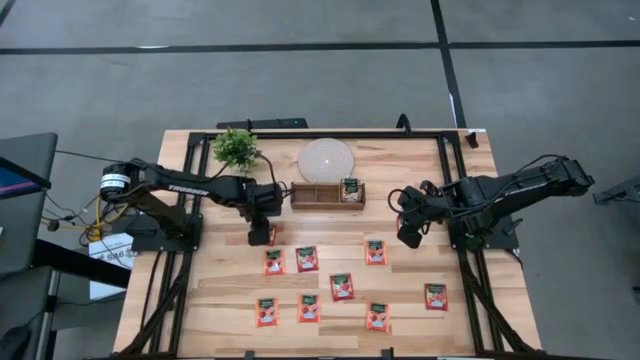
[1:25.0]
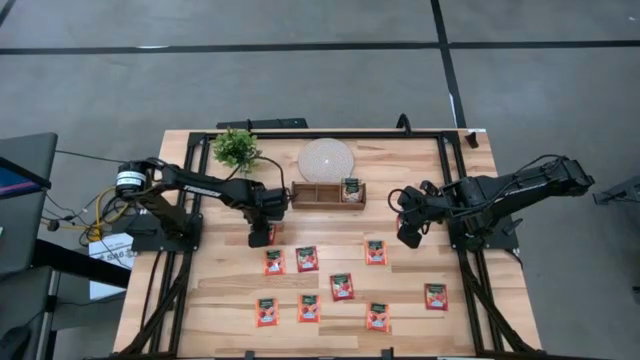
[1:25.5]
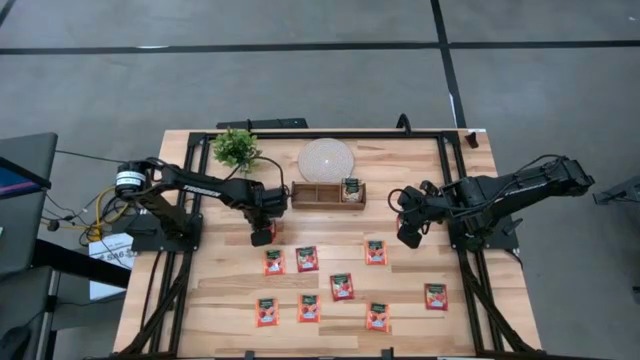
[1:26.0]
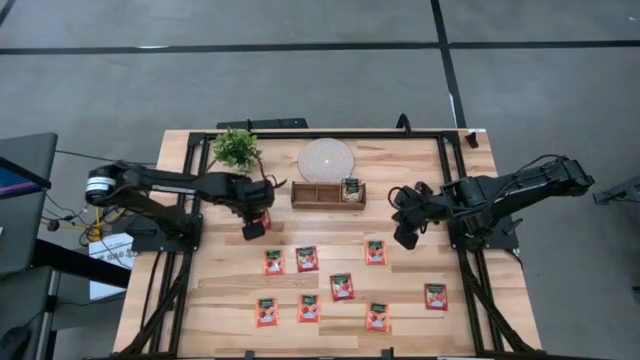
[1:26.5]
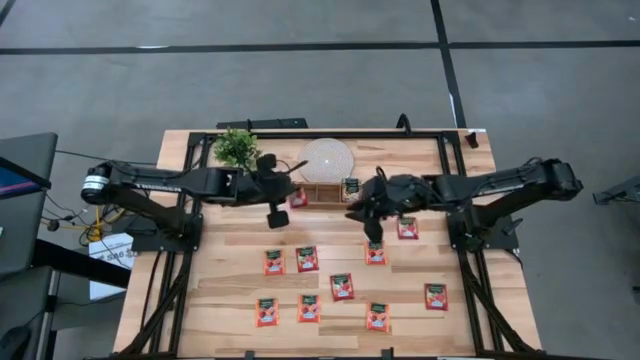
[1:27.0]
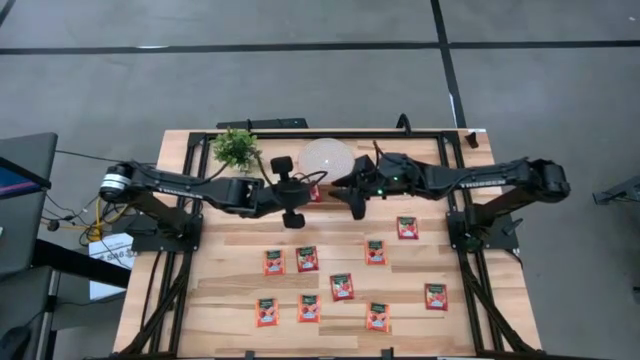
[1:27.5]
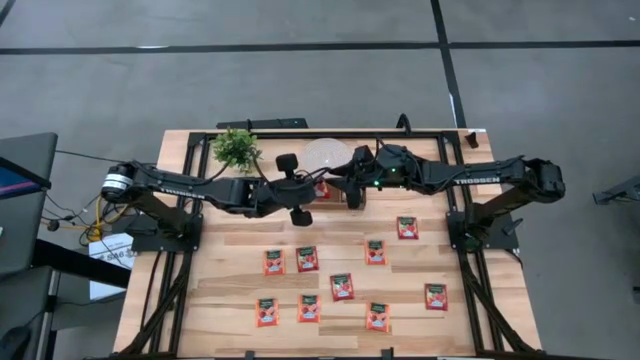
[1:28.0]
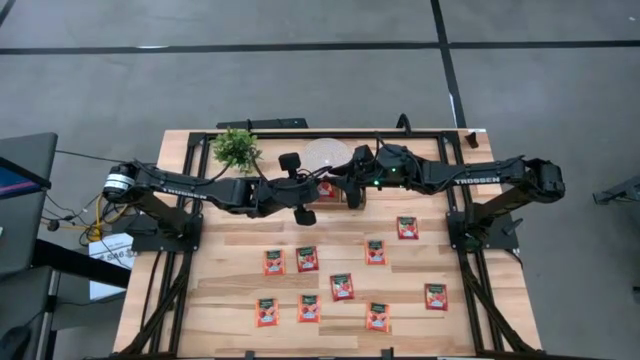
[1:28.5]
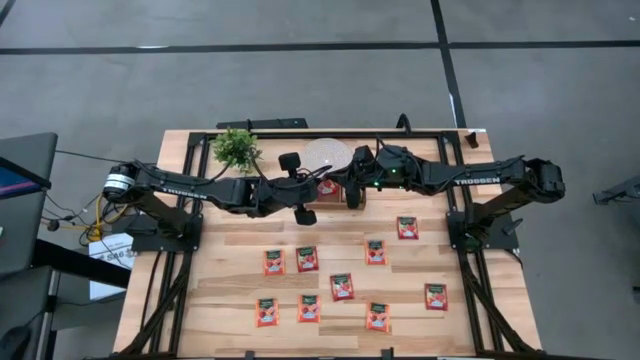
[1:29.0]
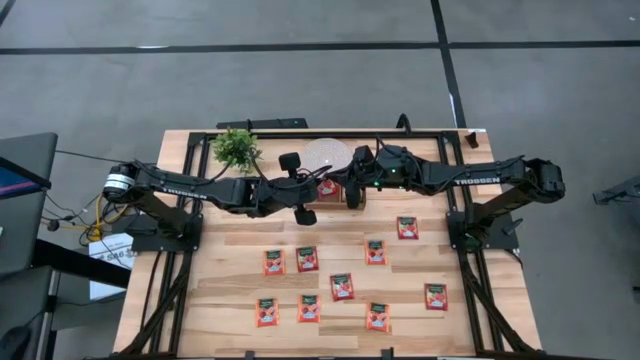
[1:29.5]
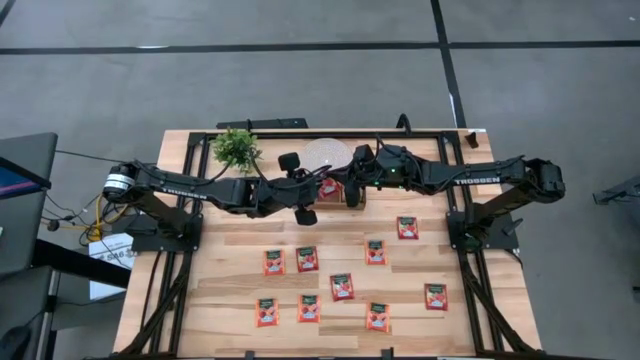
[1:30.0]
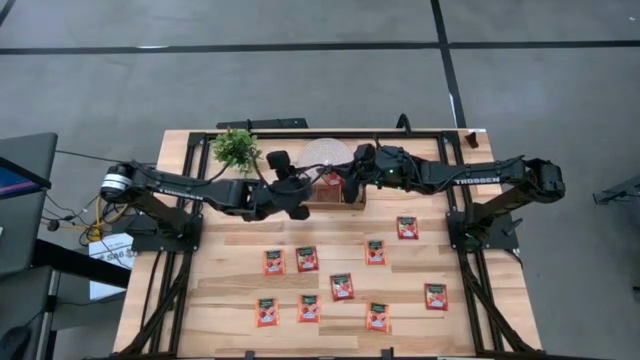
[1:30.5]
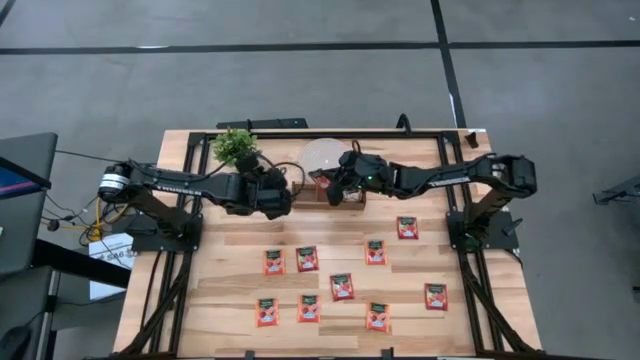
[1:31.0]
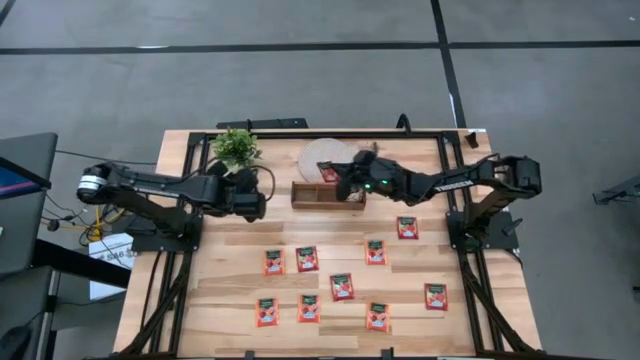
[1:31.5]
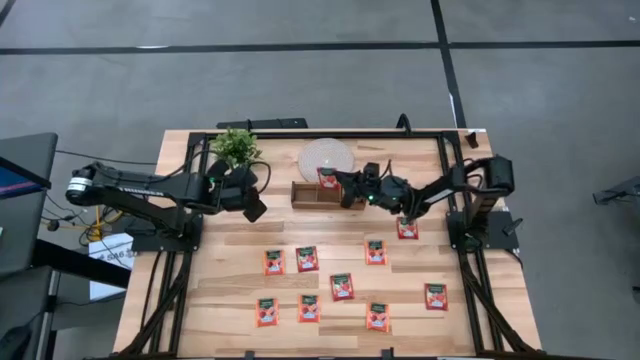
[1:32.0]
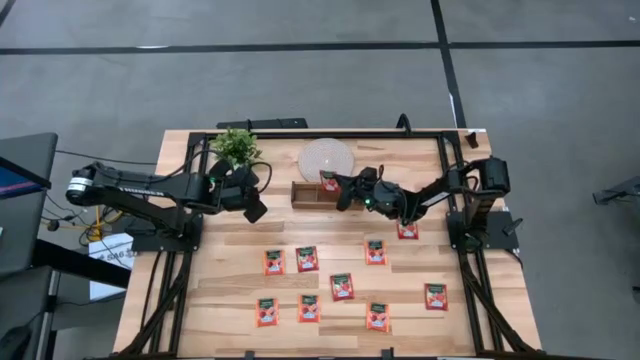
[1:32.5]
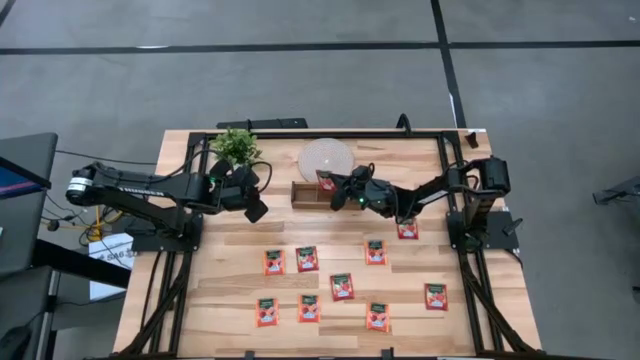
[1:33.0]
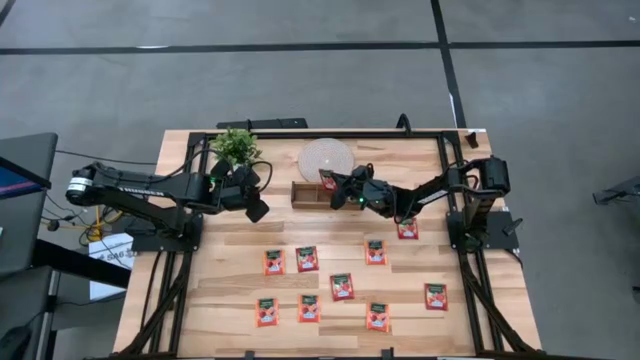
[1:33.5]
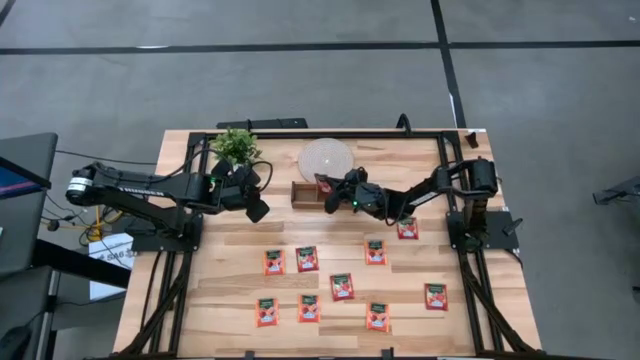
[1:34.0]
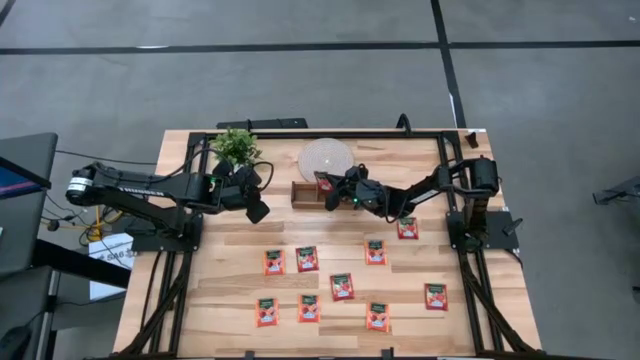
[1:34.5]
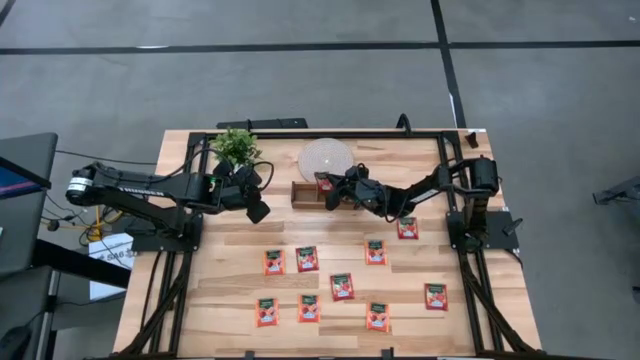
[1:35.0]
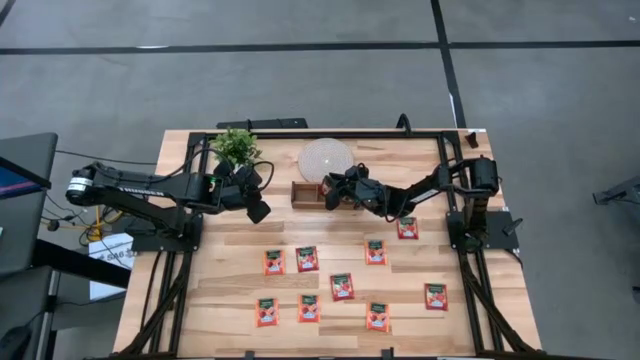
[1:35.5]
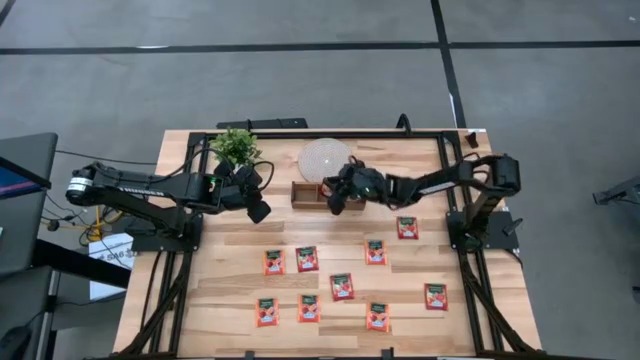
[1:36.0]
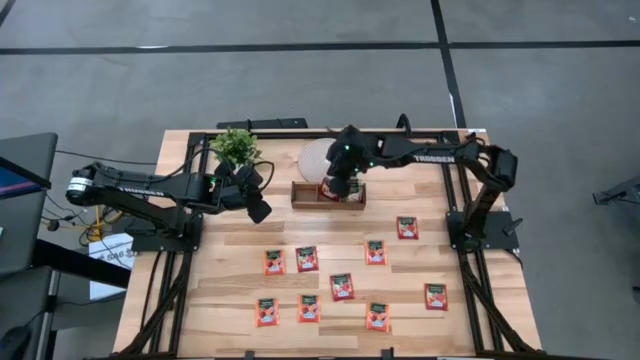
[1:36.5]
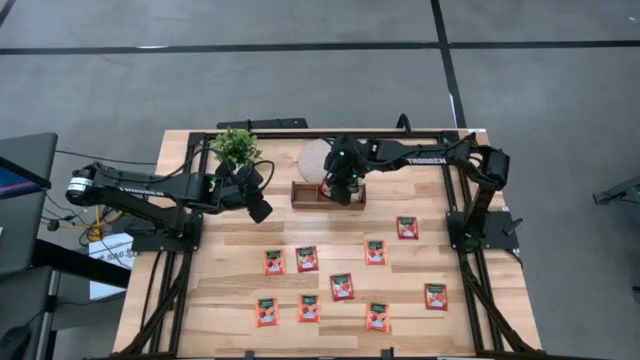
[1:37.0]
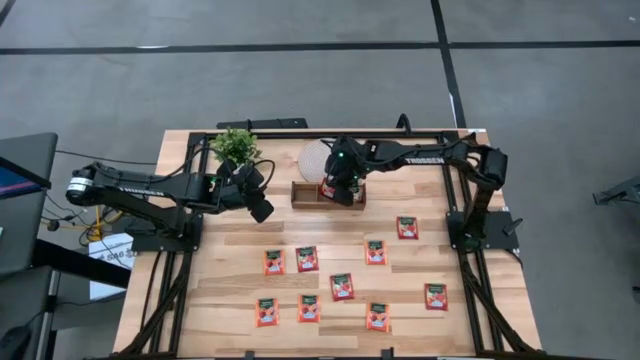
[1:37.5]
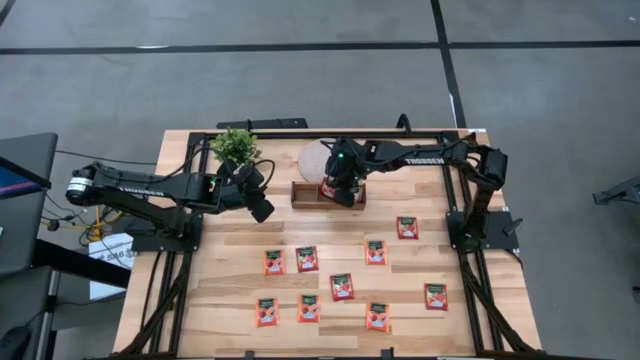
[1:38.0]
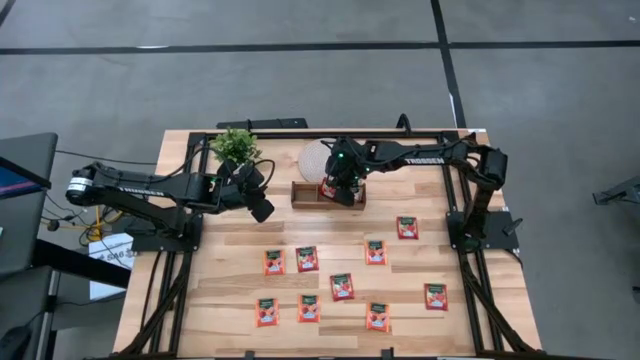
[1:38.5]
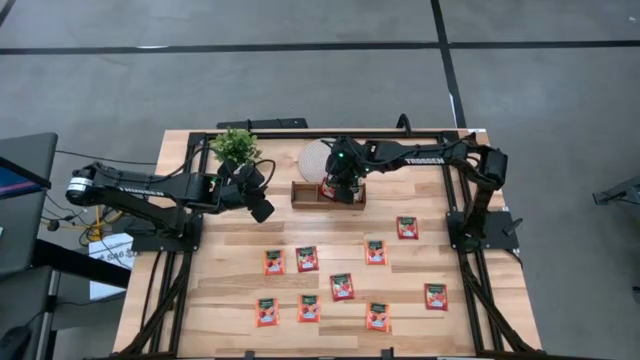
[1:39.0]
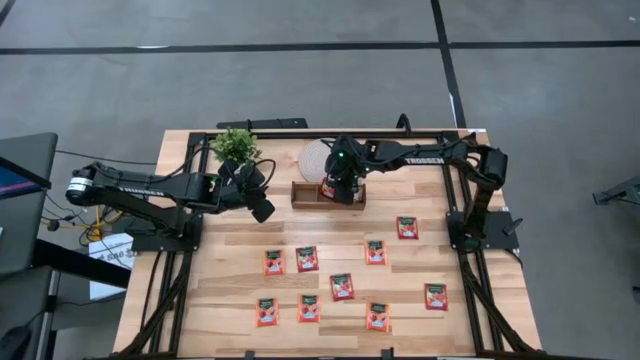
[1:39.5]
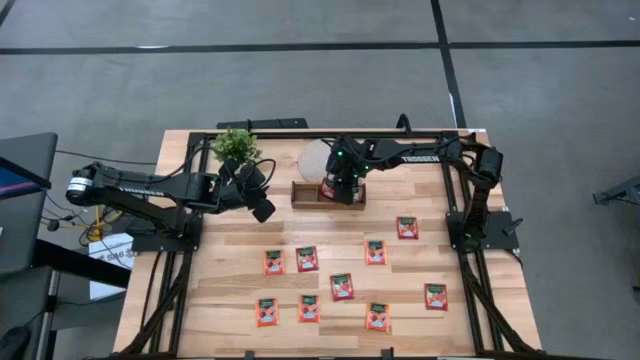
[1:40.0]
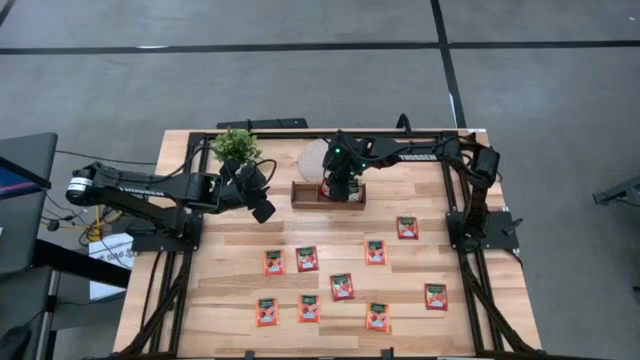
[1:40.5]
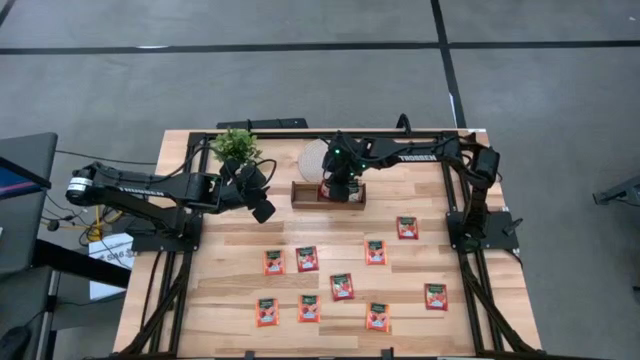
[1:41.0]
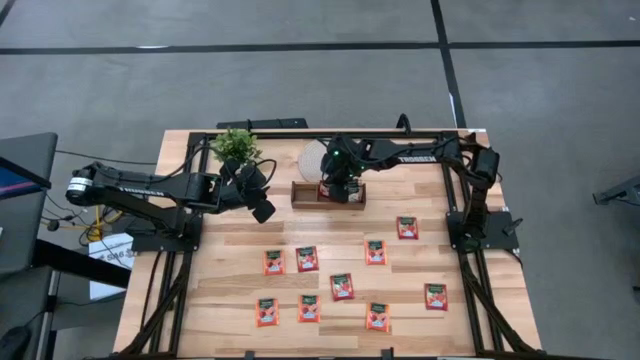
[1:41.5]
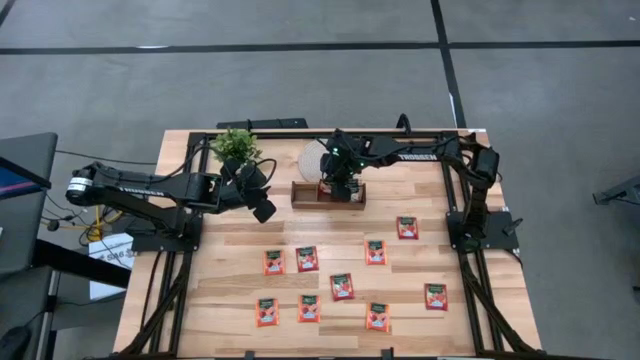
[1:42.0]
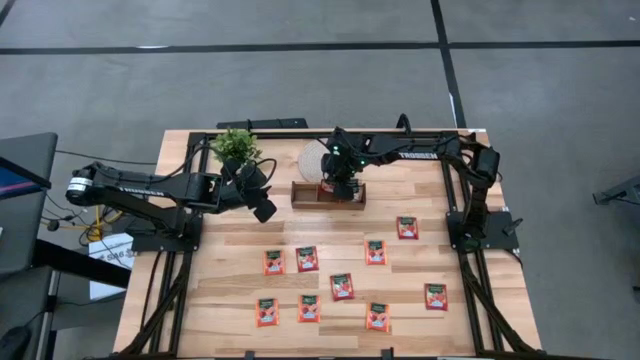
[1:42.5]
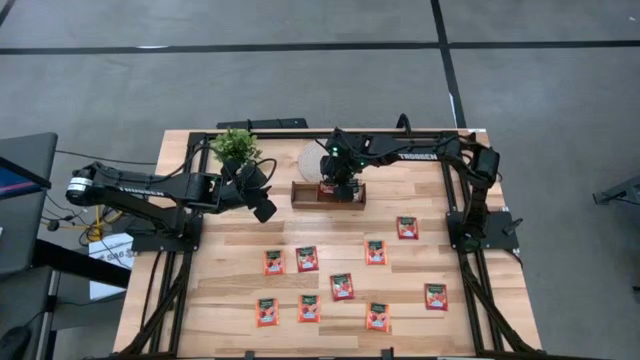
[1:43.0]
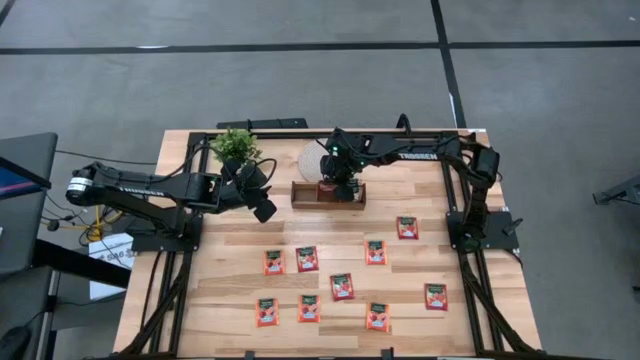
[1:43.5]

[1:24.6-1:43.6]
Task: Pick & Place Tea
Put the red tea bag into the middle section of the wooden organizer

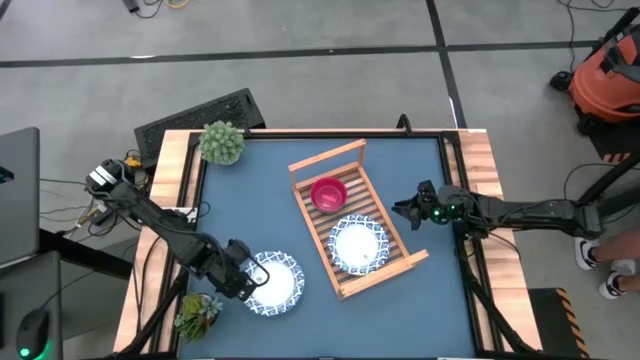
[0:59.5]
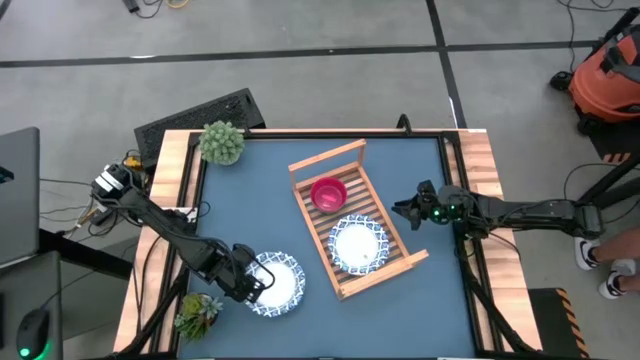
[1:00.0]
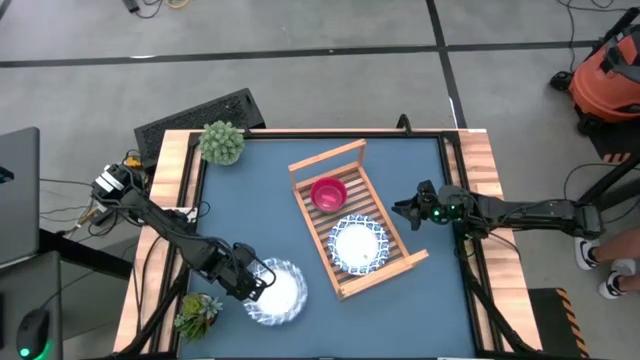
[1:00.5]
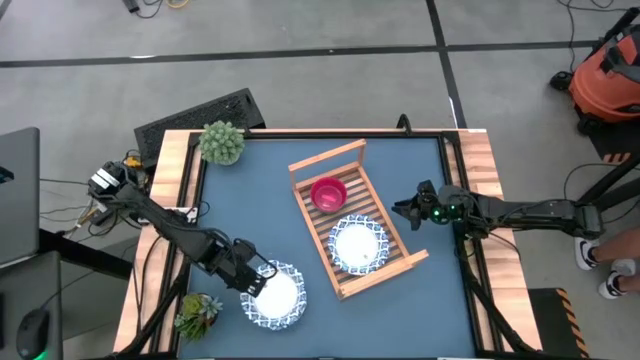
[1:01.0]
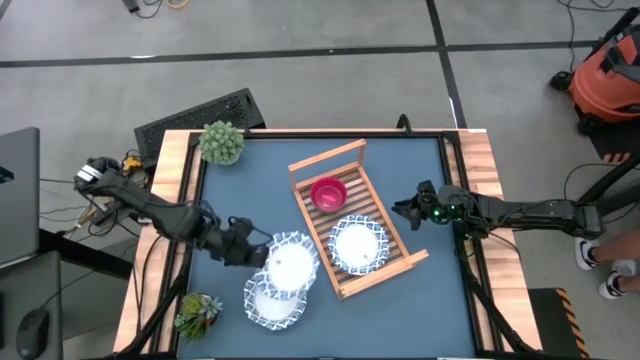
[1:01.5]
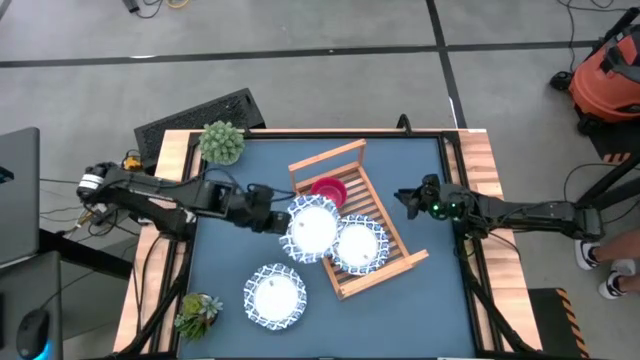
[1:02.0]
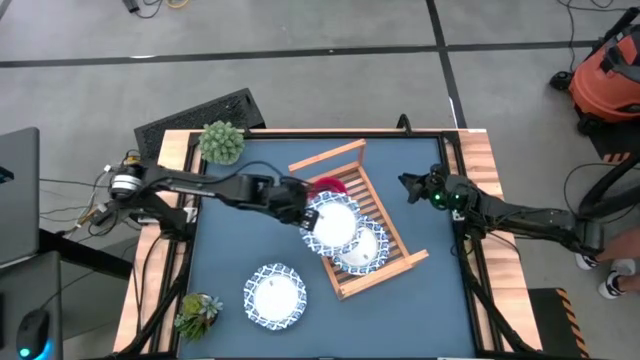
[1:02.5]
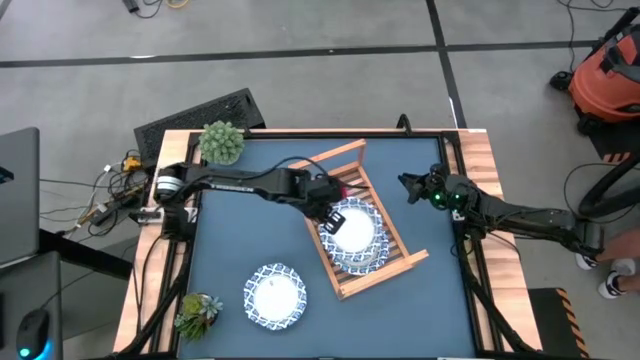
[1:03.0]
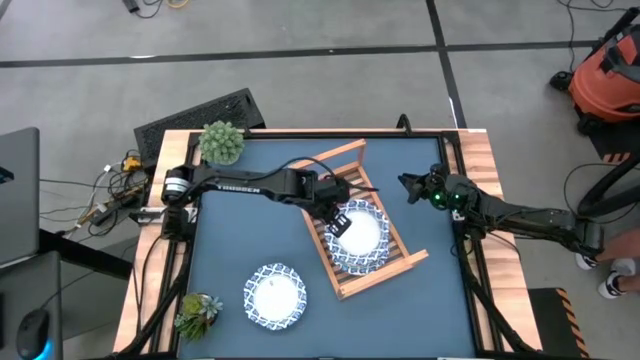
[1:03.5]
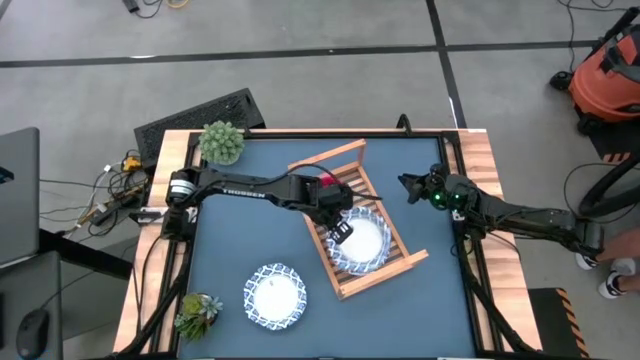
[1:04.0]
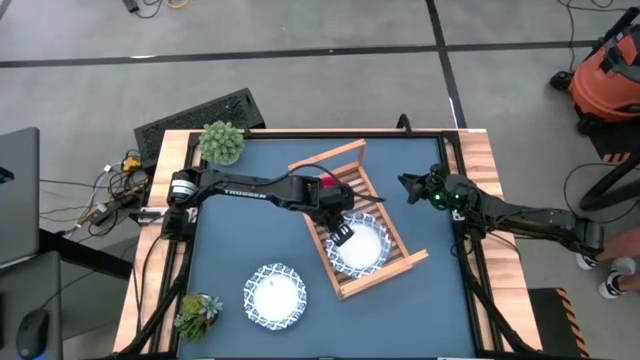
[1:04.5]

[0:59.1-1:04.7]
Task: Place and stack bowls onto a shelf
Stack the white blue bowl on top of the white blue bowl on the shelf
